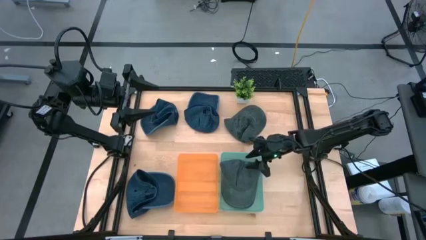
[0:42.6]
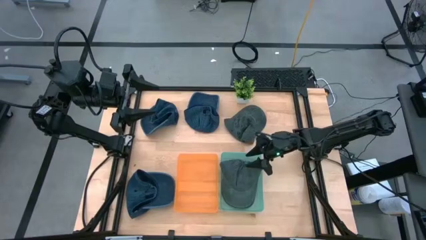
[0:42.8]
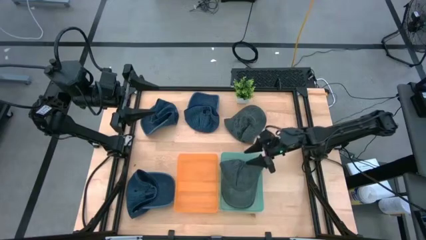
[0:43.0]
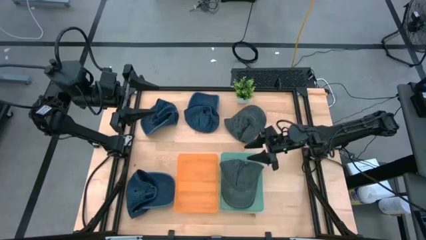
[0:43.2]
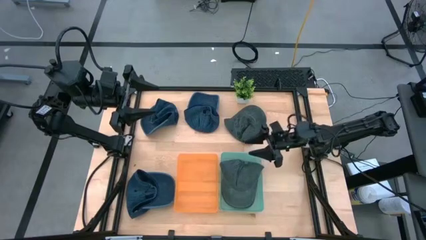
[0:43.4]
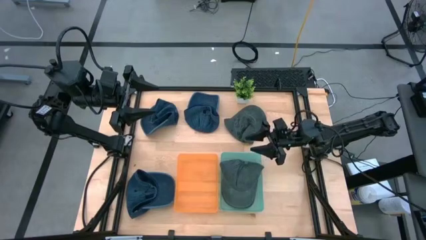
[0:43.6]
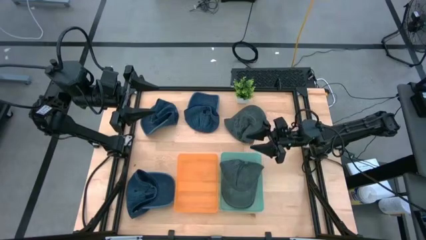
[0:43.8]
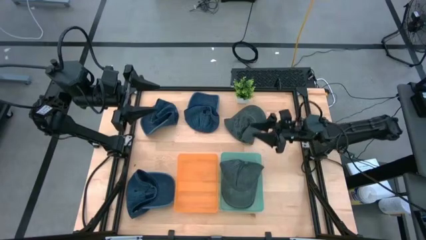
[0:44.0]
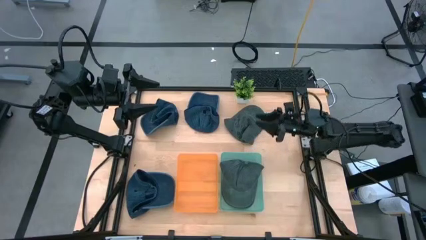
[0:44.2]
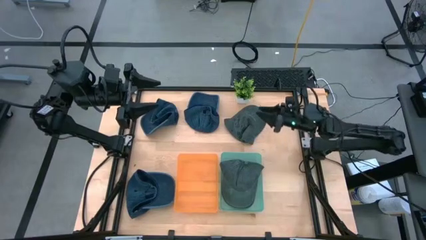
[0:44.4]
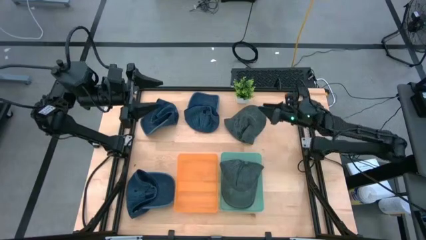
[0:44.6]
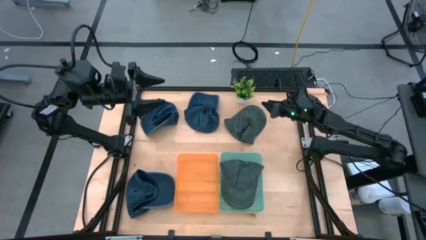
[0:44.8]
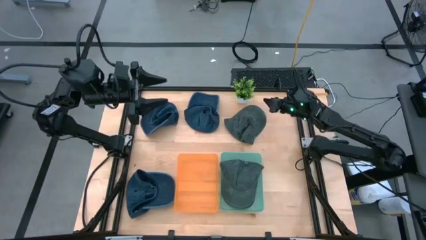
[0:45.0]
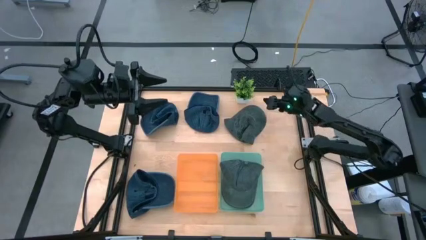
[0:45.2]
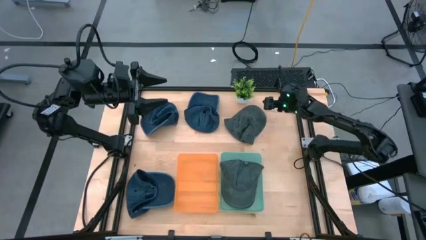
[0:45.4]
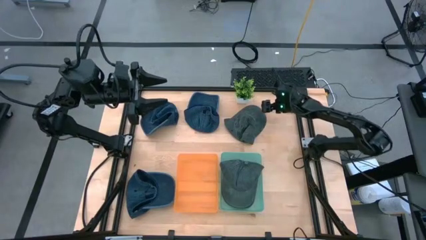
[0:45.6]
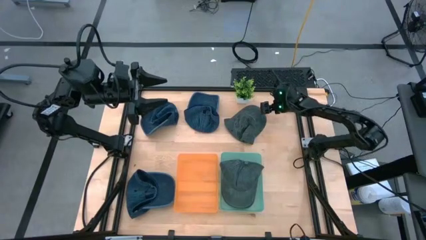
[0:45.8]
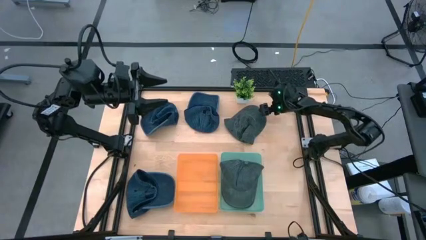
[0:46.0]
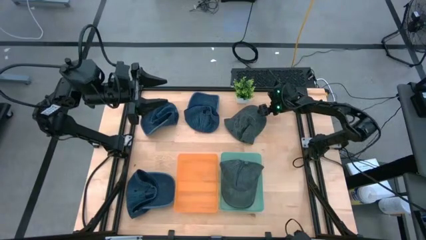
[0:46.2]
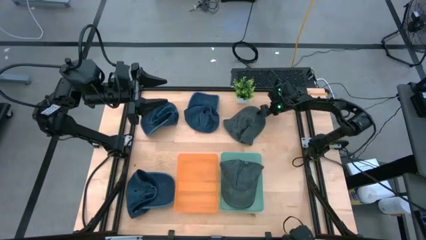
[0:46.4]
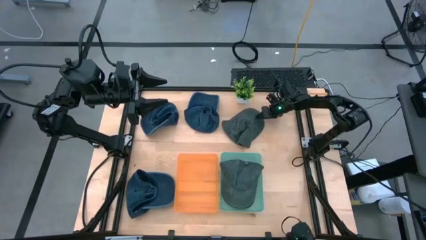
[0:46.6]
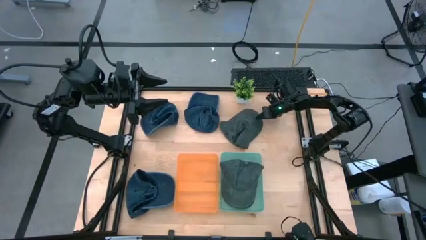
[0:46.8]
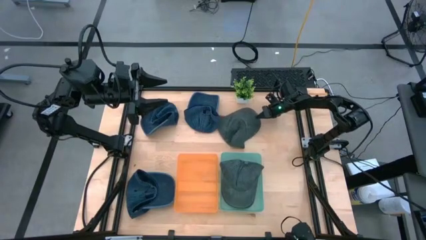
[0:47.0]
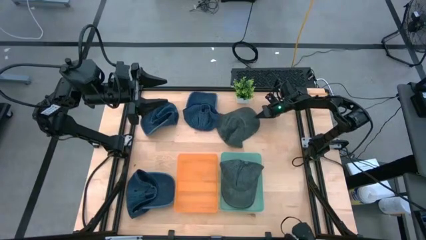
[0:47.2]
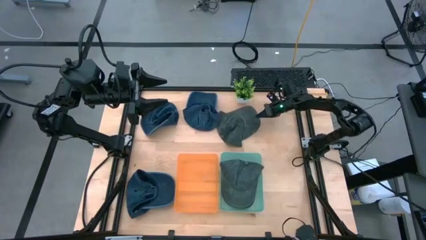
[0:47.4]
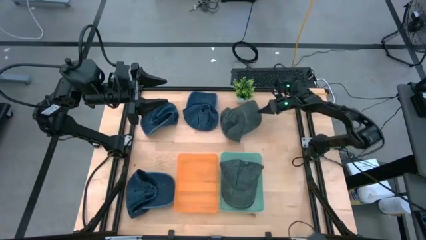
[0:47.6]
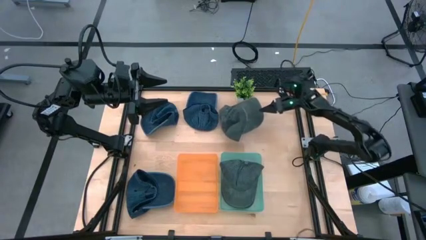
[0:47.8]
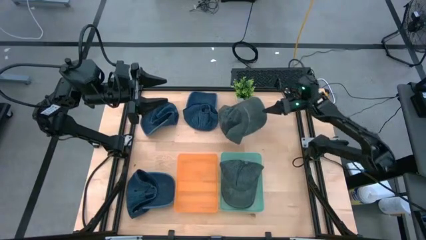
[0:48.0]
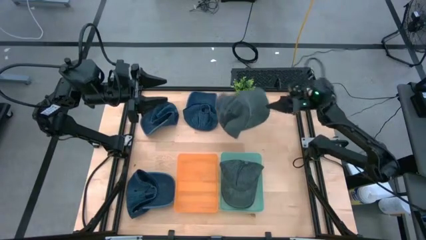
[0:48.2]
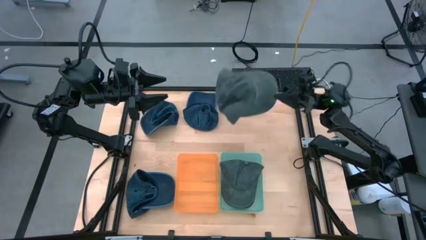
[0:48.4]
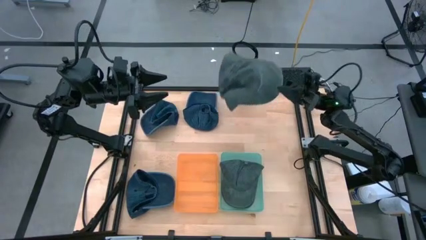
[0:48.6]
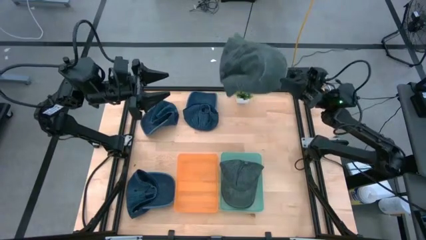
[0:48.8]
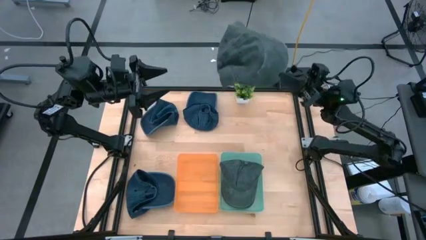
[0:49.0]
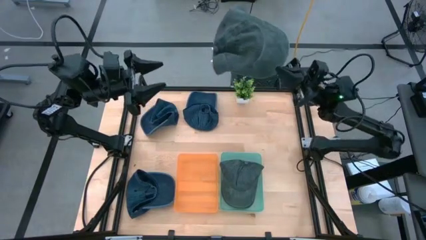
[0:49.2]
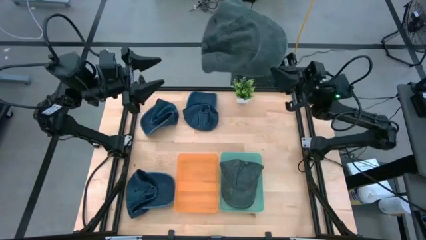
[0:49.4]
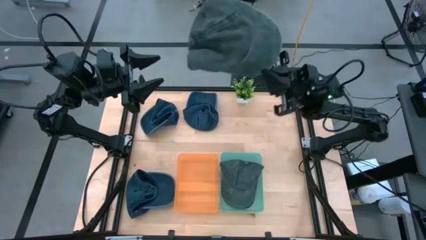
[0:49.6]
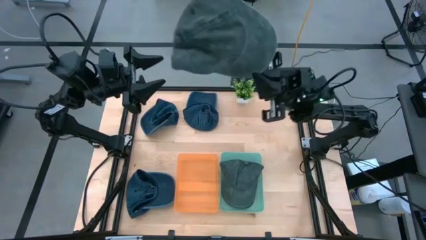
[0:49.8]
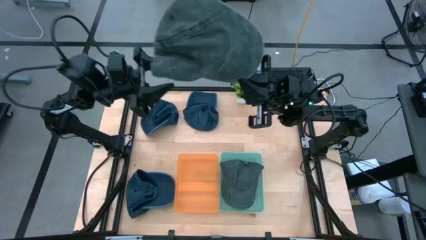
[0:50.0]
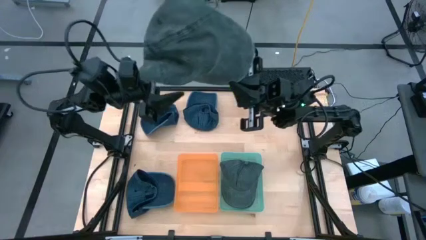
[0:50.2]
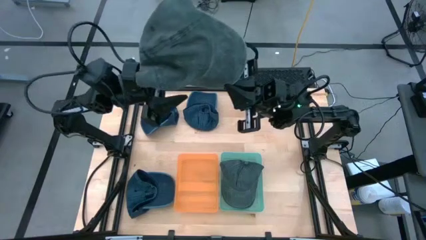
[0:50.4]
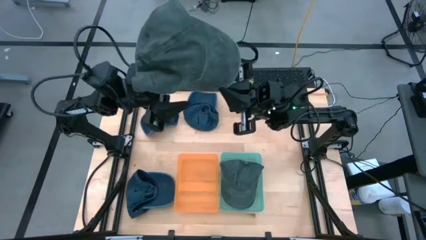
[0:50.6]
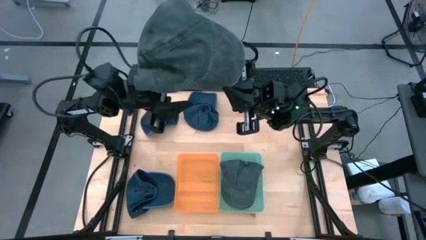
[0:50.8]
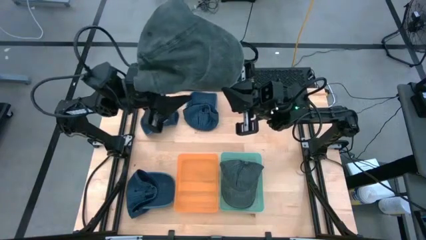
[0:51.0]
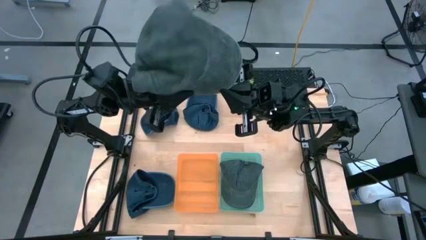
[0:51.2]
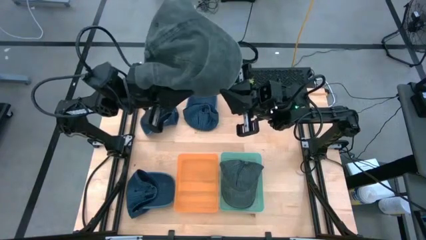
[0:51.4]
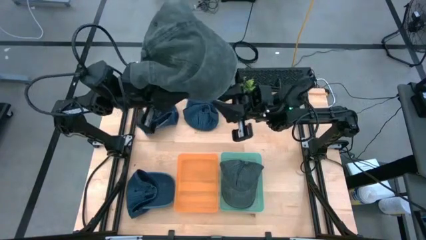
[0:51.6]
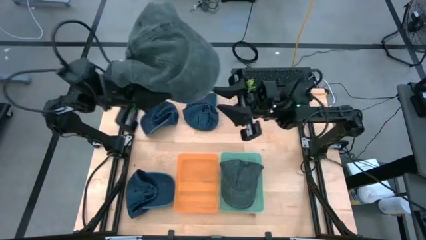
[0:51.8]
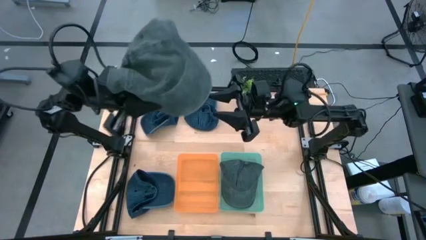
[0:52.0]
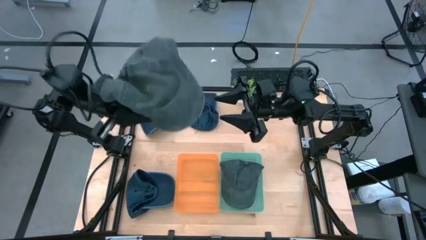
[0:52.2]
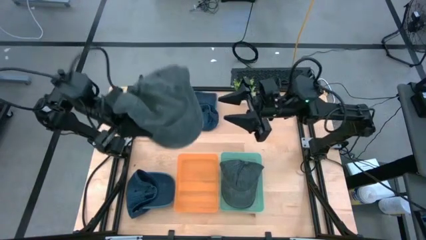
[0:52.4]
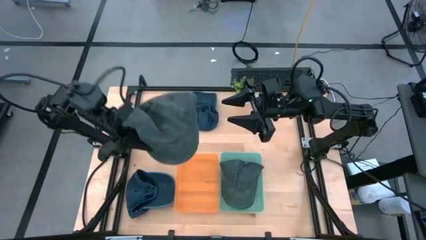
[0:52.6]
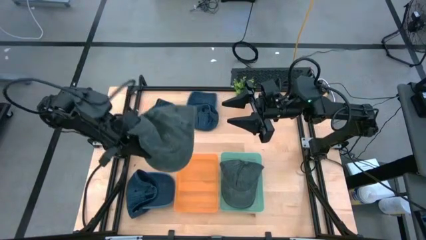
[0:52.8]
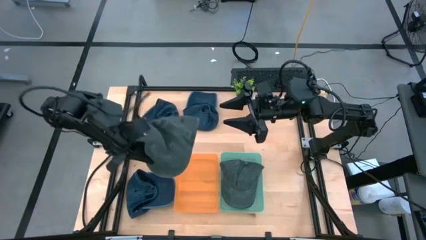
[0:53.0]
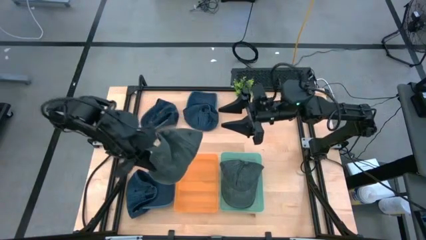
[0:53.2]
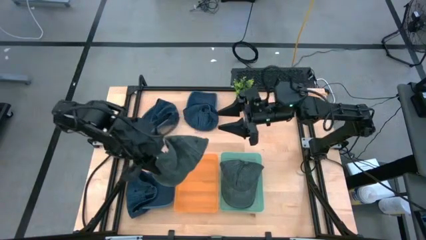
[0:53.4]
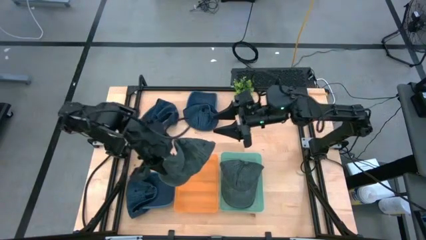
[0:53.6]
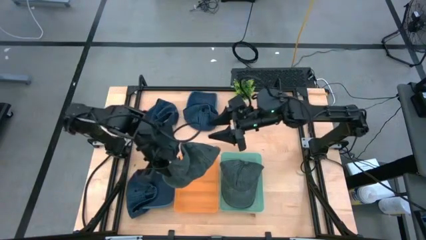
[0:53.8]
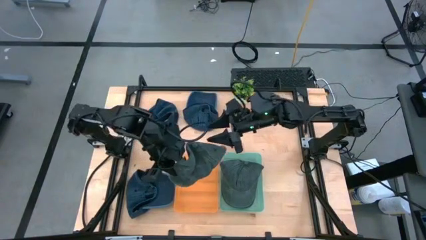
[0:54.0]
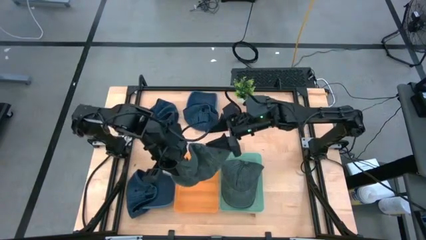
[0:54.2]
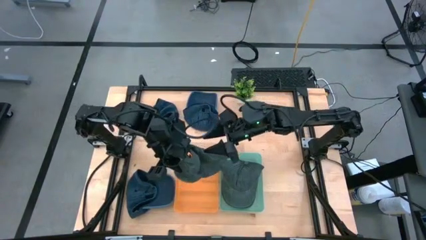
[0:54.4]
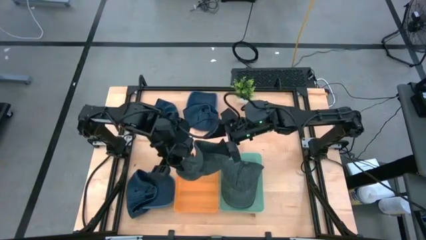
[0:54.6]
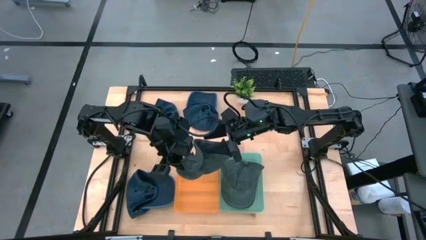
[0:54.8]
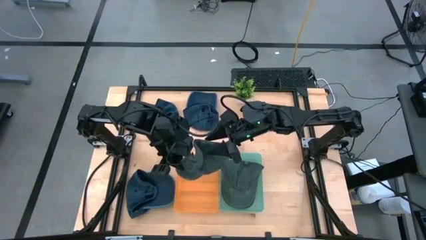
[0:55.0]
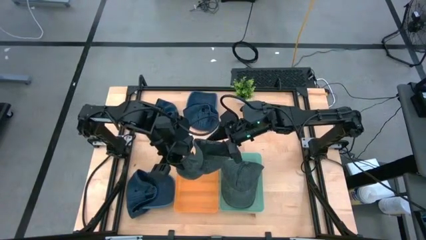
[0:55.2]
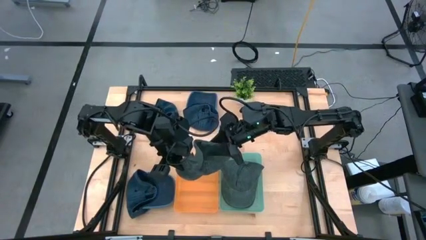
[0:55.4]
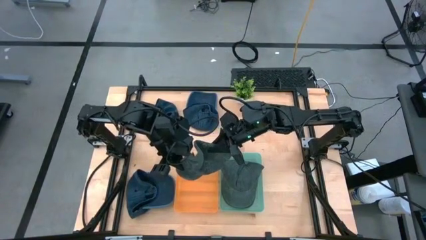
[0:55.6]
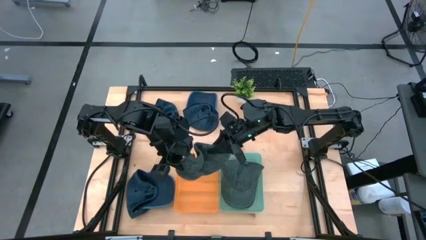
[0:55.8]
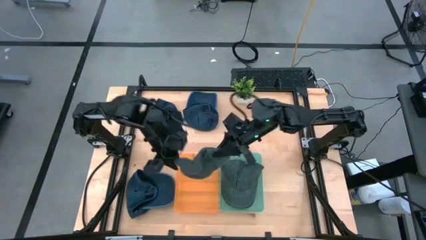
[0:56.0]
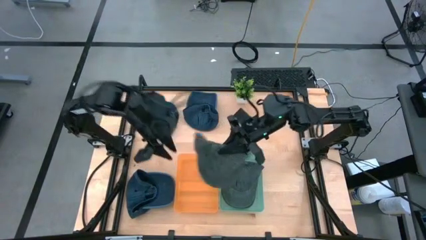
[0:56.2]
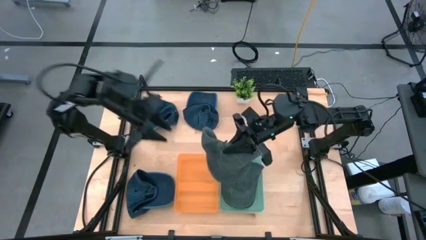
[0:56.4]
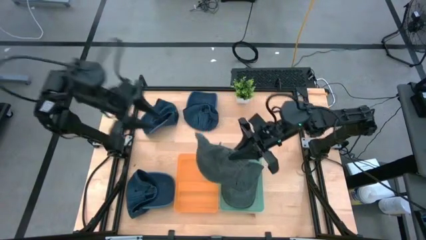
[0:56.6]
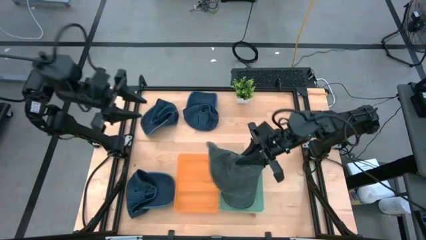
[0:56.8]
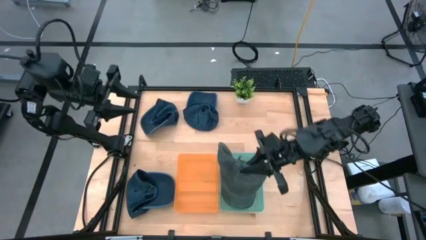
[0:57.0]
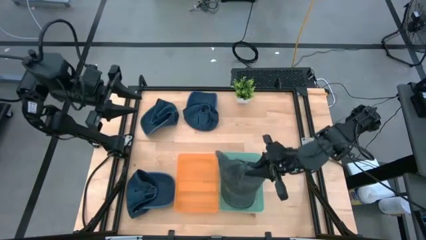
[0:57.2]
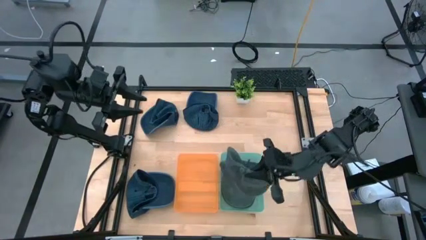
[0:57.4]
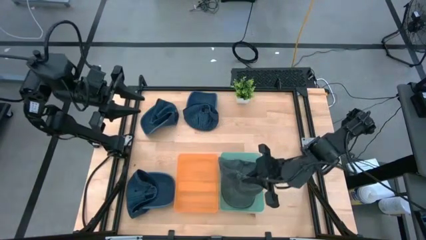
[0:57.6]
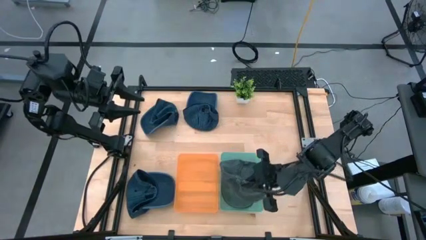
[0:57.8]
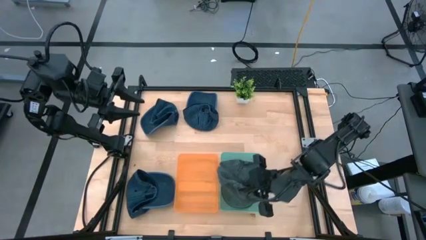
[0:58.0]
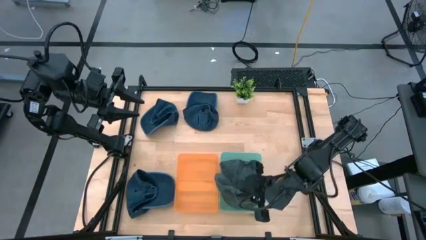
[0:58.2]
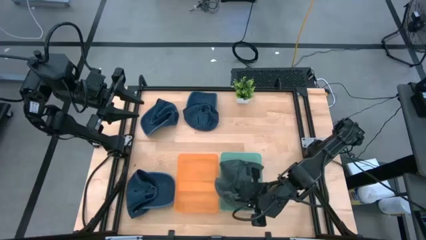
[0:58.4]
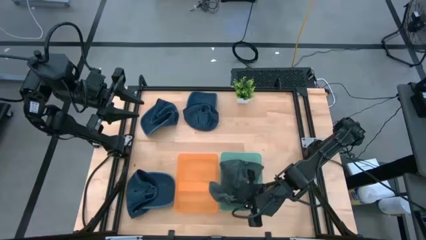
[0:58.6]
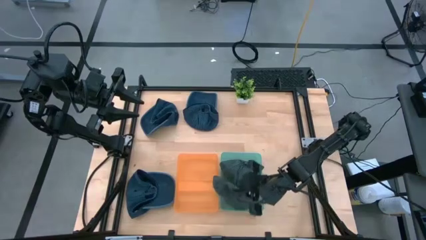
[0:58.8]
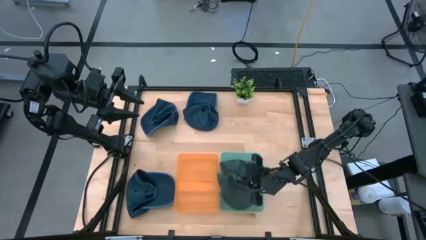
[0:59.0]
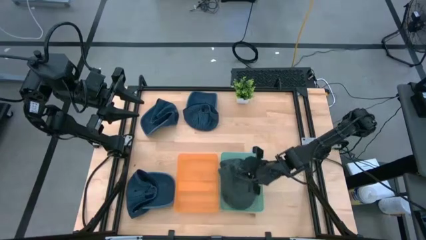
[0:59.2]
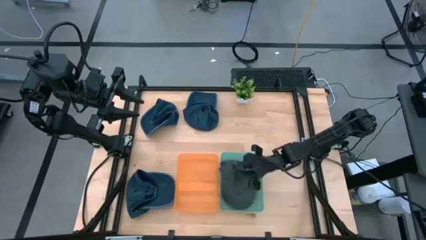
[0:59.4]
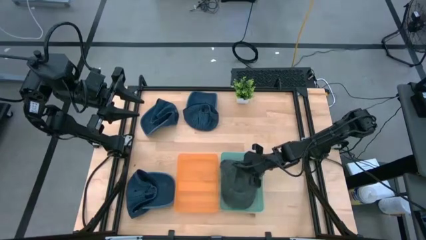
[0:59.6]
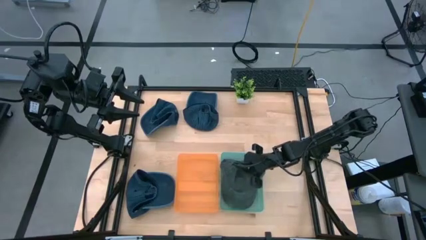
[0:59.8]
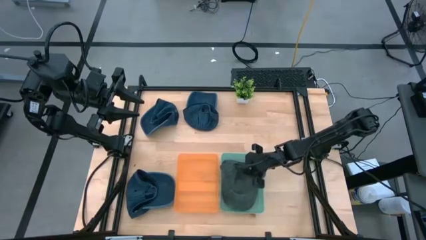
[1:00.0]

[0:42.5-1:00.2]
Task: Pick & Place hat
Put the black cap into the green bin
